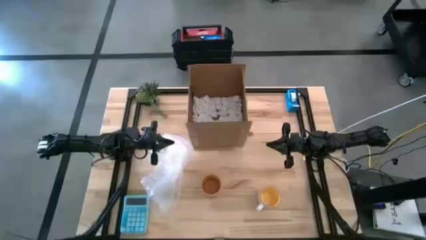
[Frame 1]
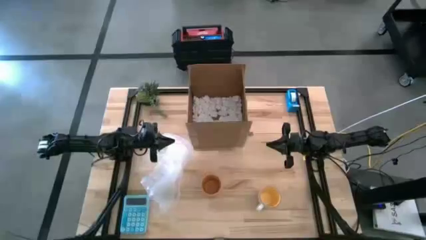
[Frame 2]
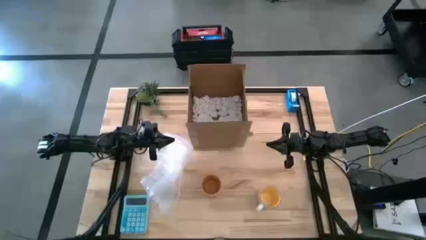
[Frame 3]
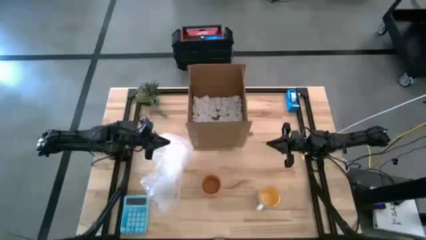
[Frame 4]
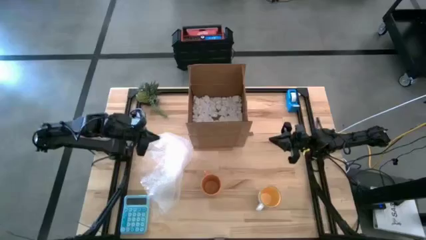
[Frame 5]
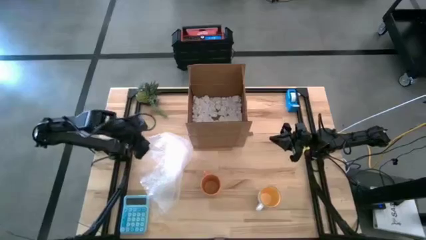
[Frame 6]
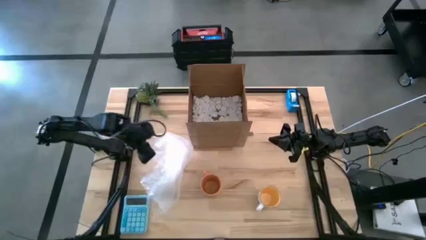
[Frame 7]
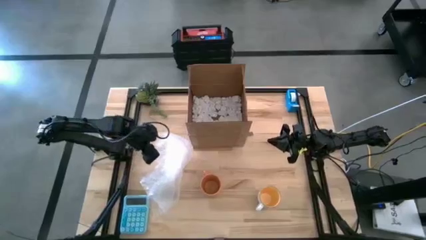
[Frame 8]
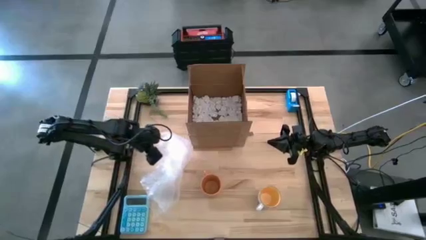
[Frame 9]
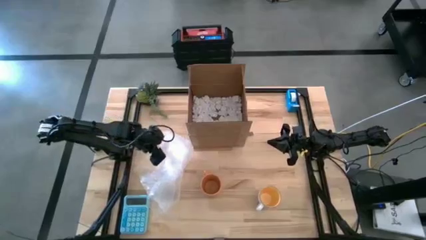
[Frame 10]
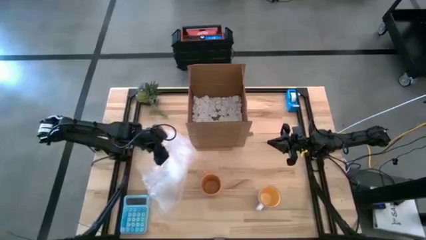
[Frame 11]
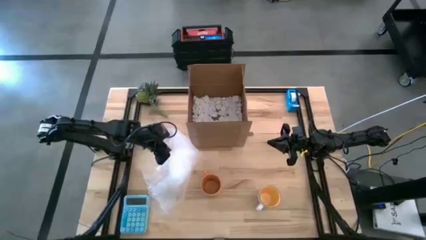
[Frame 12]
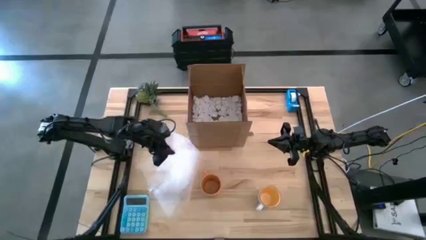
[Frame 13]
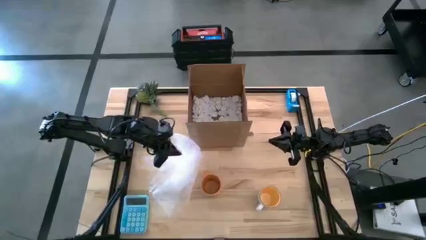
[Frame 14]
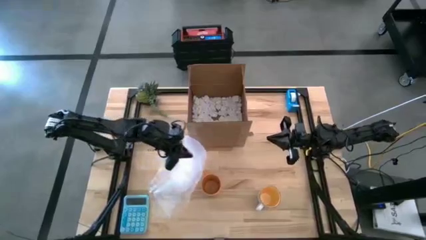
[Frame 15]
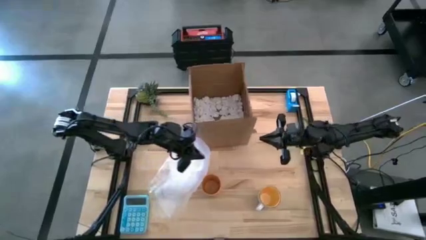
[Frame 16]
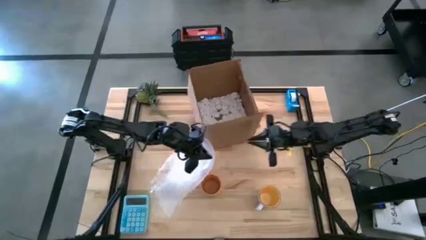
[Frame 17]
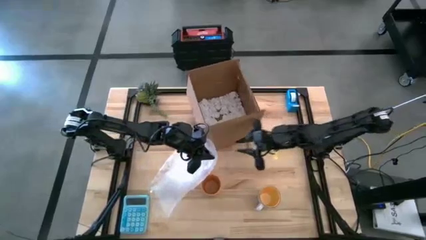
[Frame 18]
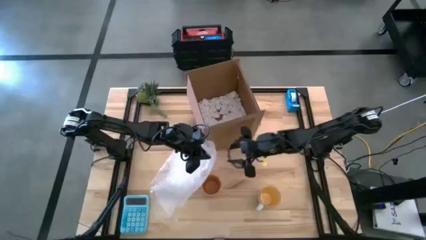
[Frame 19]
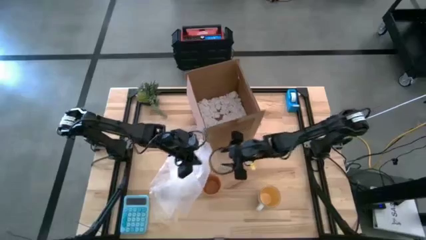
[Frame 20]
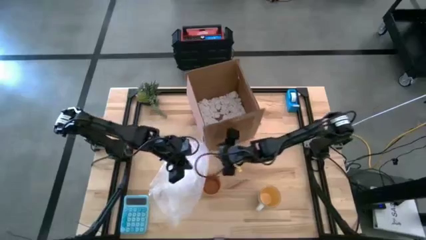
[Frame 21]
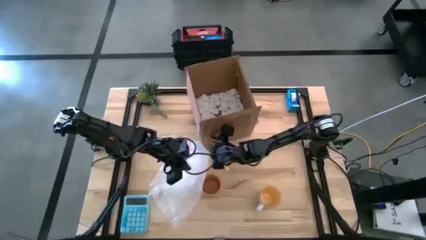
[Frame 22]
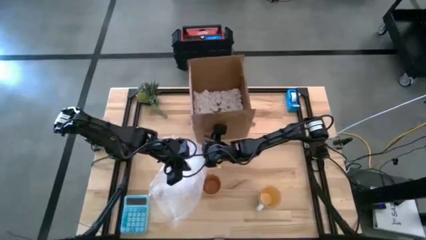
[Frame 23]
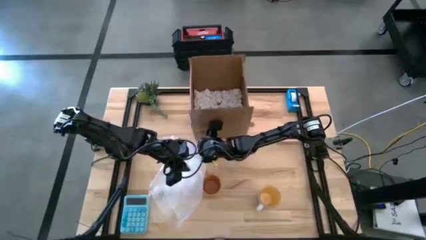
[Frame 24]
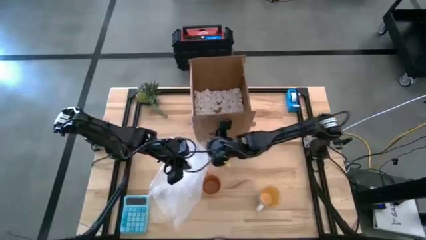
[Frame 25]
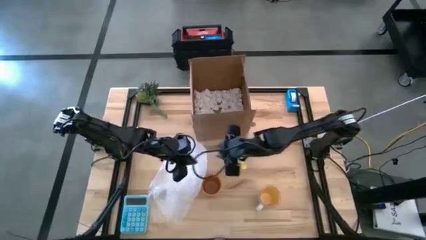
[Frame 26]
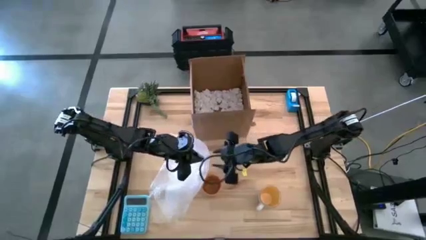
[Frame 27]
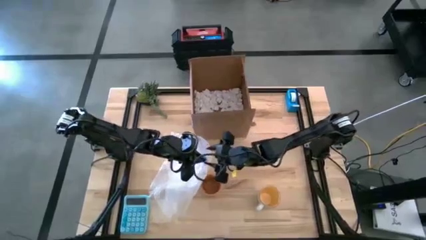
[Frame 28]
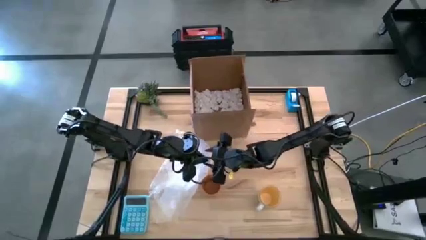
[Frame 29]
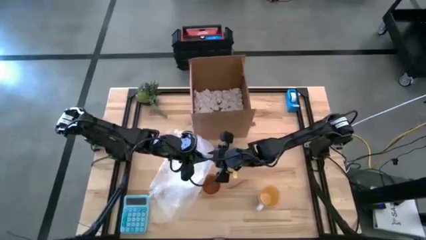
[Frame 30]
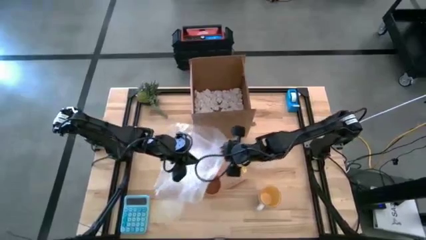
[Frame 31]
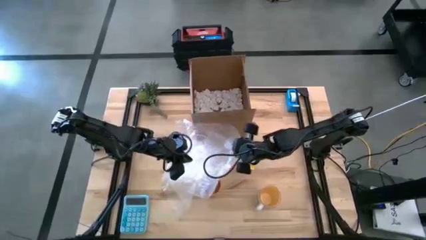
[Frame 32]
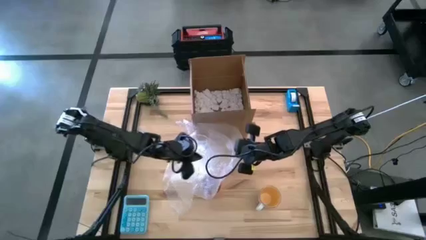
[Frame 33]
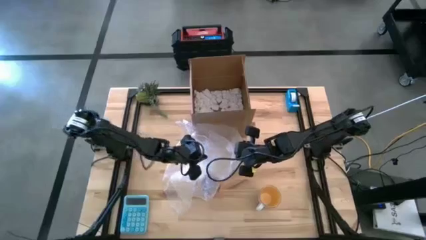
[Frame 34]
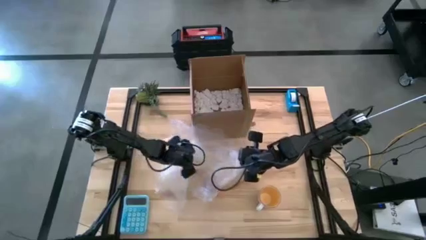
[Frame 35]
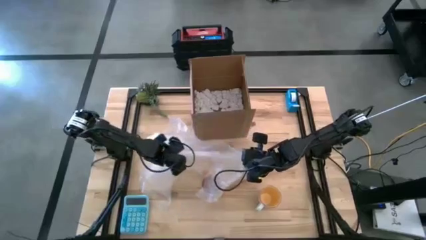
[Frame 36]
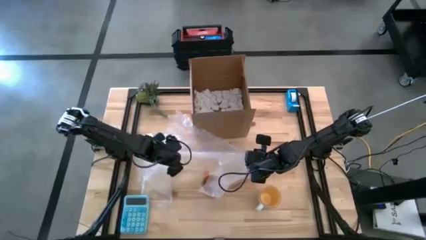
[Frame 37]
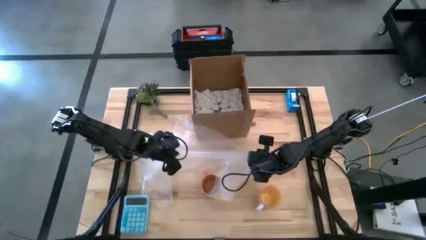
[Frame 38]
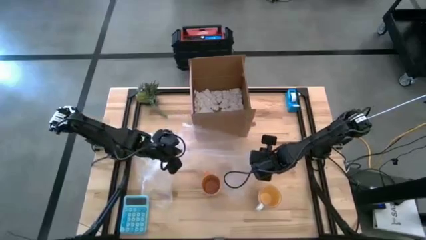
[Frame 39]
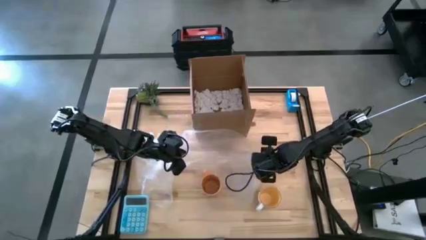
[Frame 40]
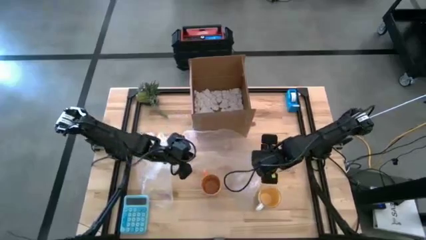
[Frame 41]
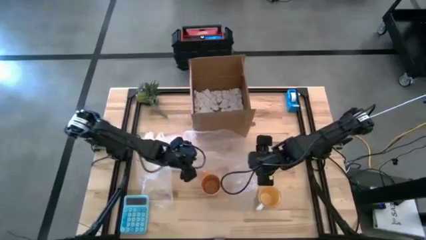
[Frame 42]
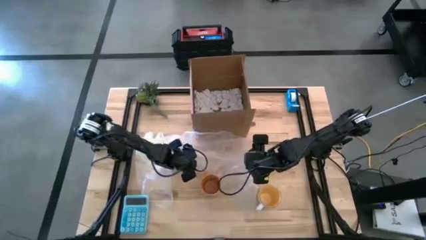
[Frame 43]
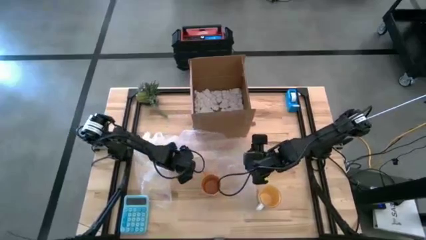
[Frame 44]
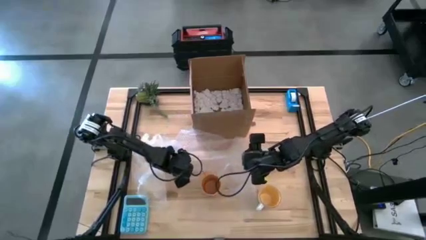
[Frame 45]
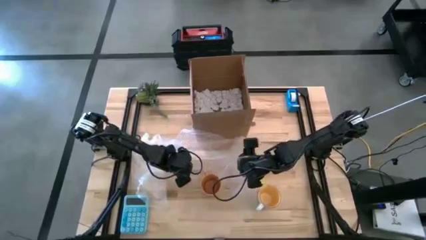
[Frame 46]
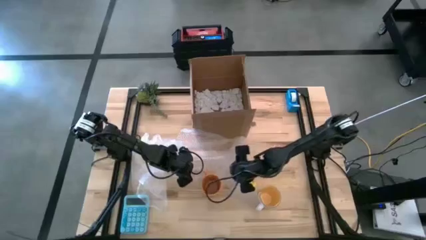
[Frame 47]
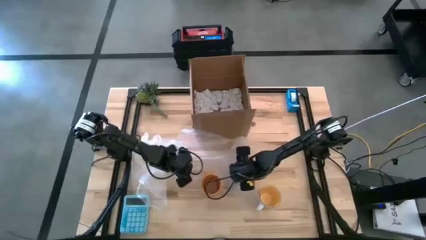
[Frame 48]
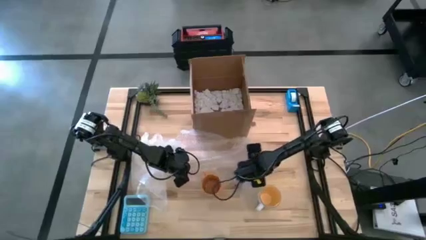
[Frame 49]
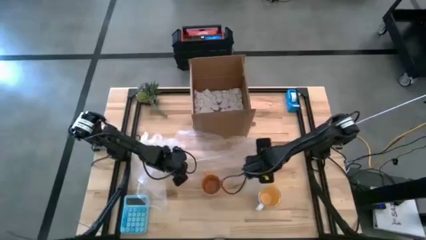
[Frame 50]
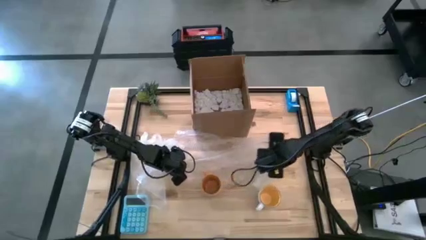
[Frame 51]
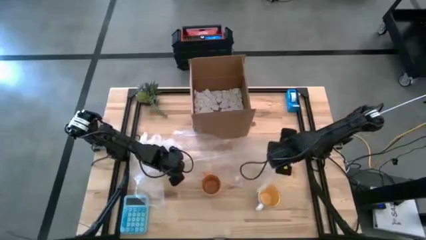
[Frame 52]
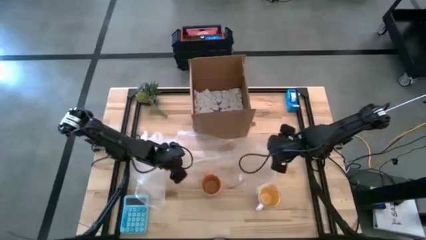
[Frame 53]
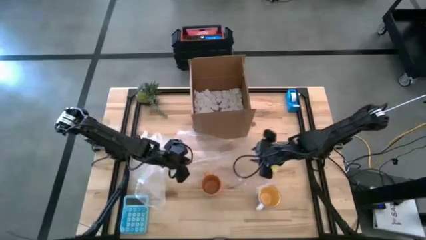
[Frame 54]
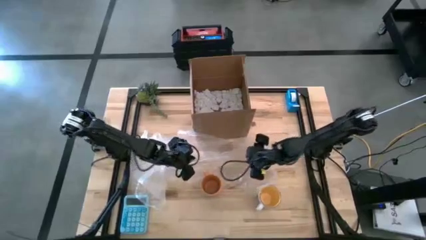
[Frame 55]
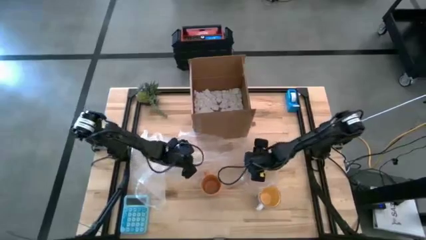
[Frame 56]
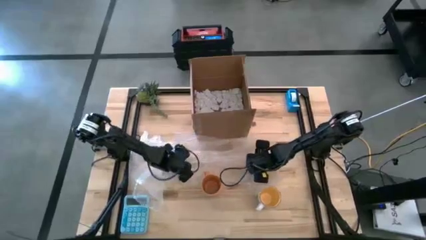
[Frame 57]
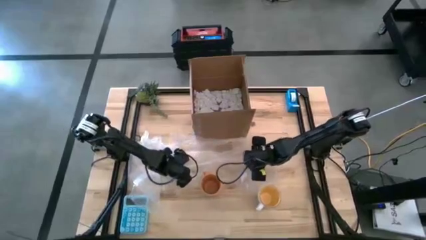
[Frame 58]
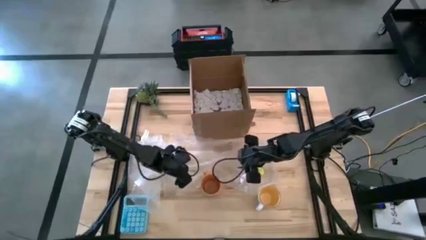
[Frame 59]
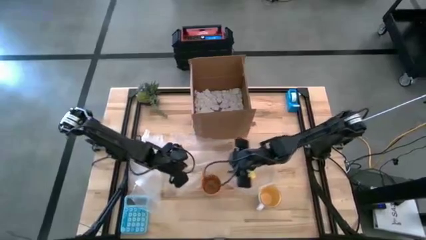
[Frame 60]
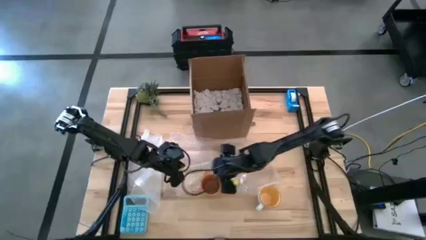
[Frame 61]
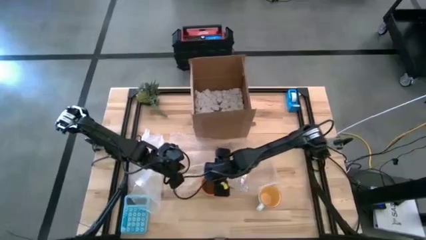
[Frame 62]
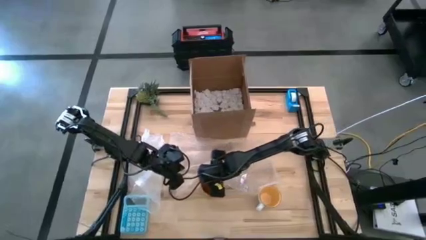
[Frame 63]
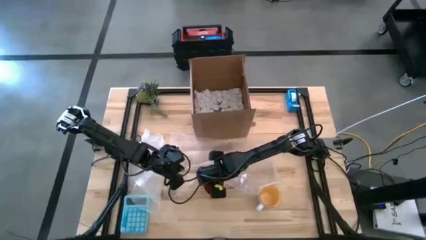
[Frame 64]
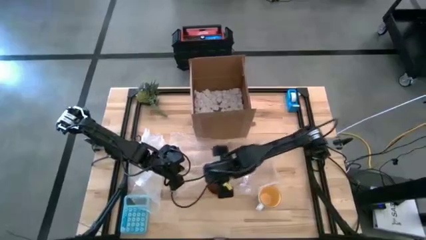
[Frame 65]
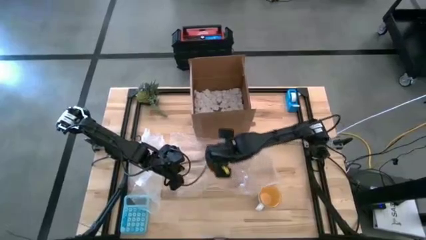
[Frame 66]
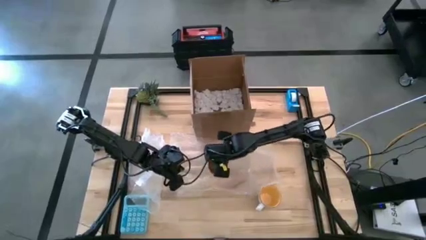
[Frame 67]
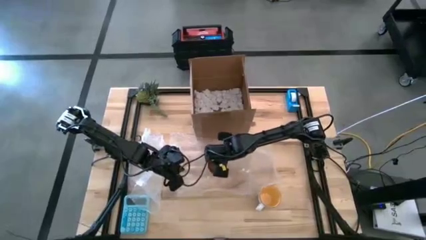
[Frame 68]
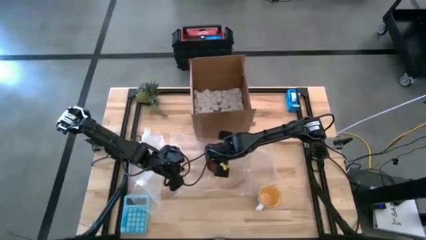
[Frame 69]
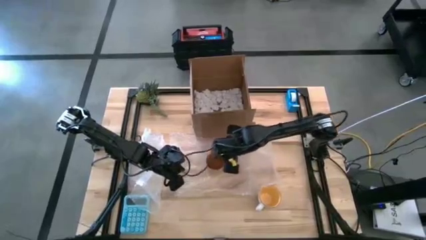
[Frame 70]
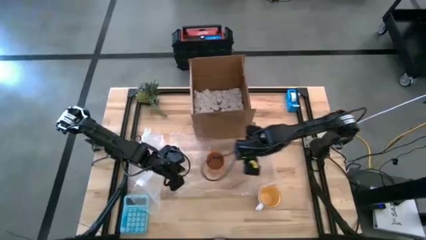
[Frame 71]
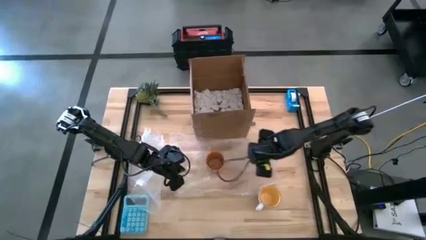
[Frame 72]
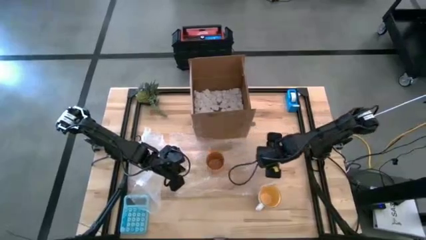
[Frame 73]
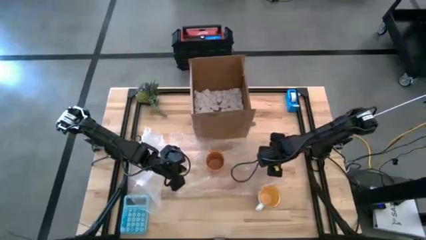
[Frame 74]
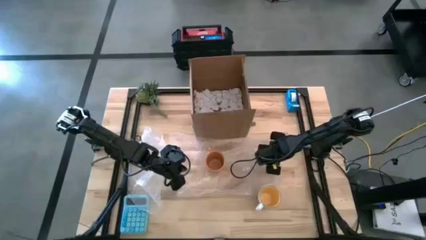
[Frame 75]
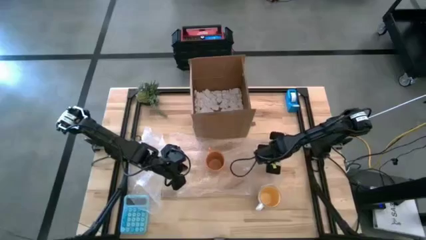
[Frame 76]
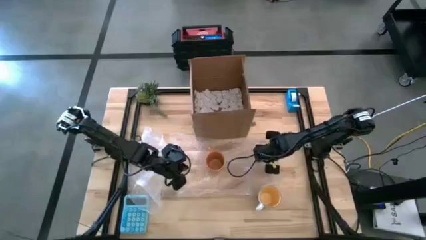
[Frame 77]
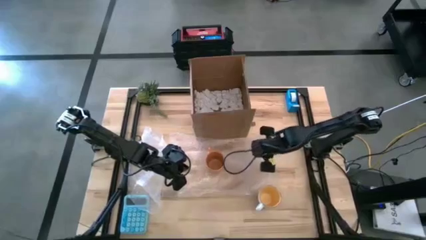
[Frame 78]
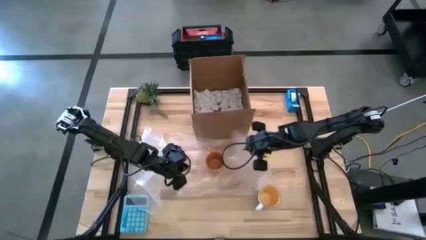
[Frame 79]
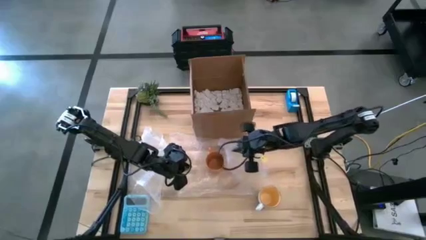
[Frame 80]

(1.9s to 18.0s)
Task: wrap mug
Wrap the orange mug with bubble wrap
